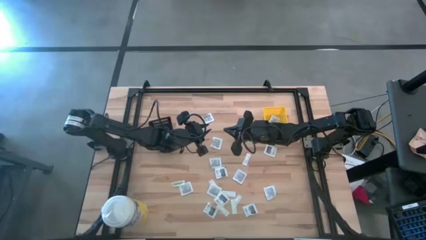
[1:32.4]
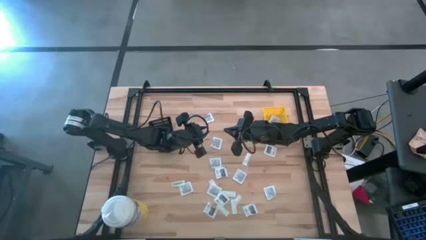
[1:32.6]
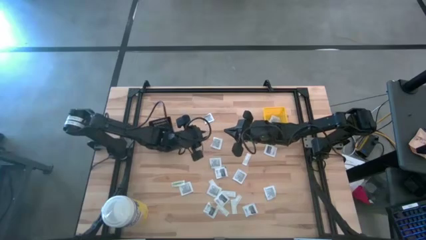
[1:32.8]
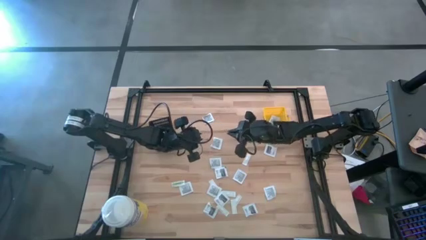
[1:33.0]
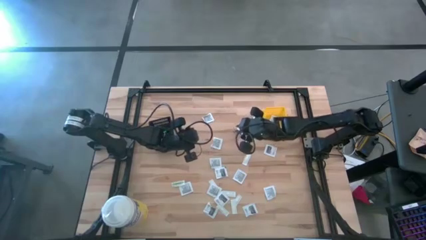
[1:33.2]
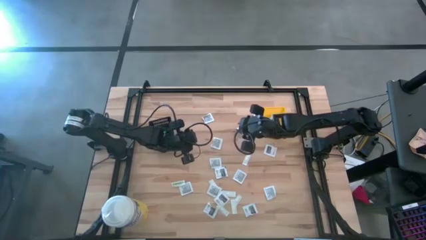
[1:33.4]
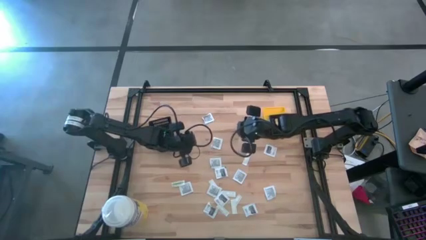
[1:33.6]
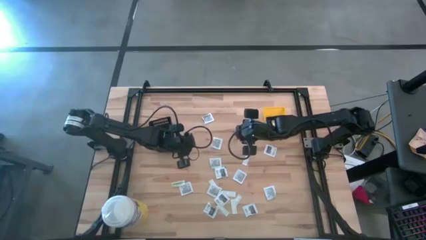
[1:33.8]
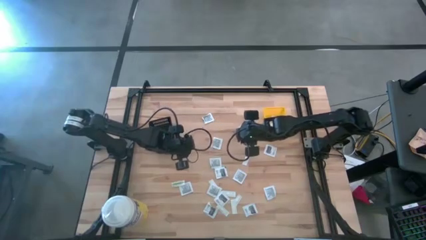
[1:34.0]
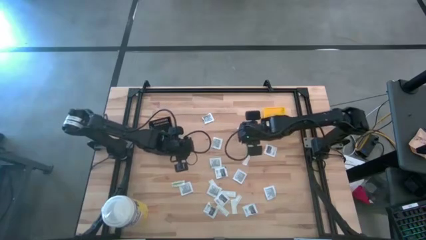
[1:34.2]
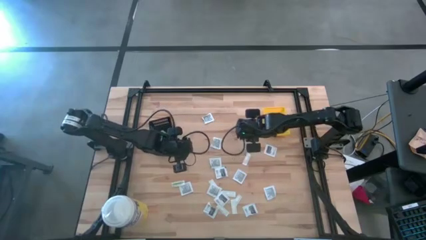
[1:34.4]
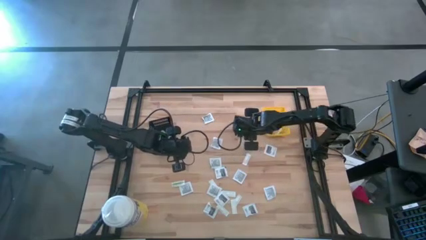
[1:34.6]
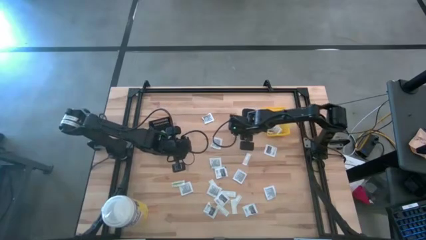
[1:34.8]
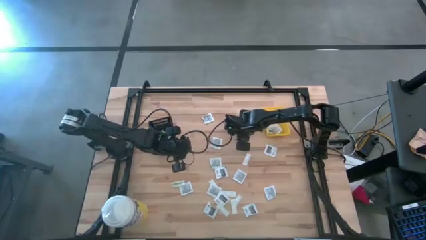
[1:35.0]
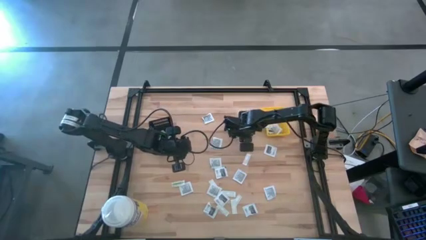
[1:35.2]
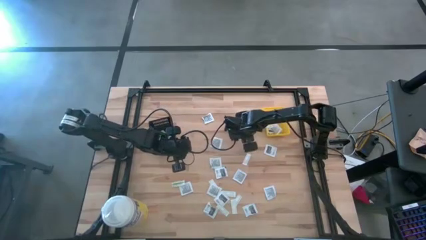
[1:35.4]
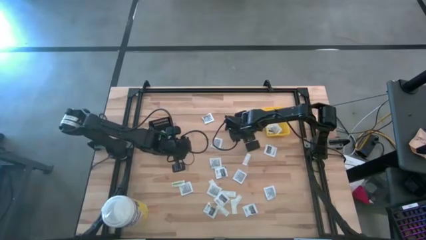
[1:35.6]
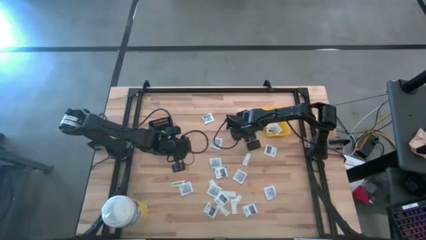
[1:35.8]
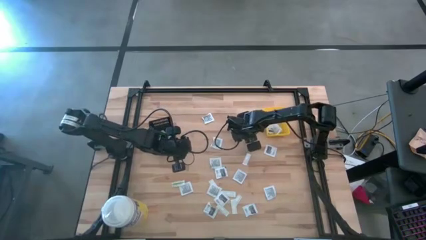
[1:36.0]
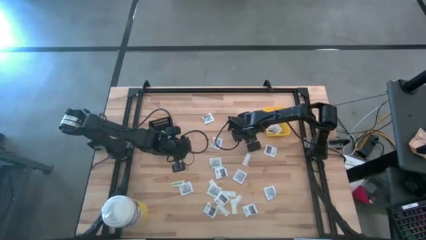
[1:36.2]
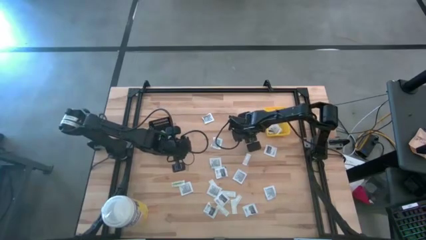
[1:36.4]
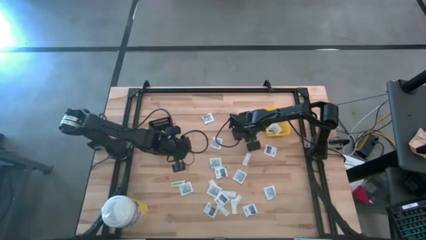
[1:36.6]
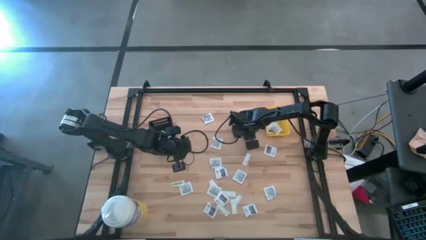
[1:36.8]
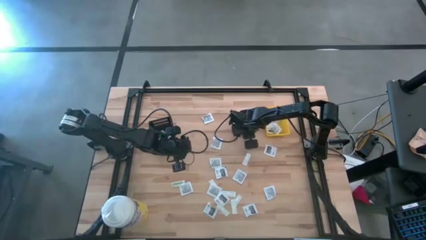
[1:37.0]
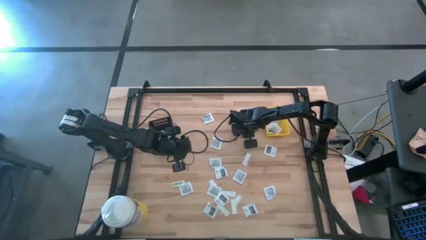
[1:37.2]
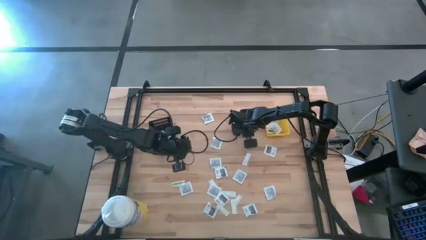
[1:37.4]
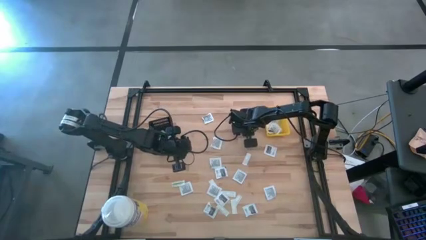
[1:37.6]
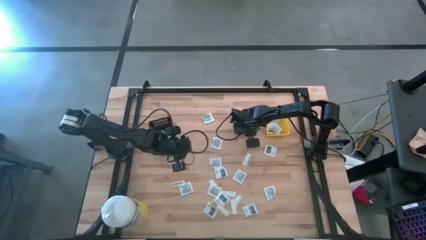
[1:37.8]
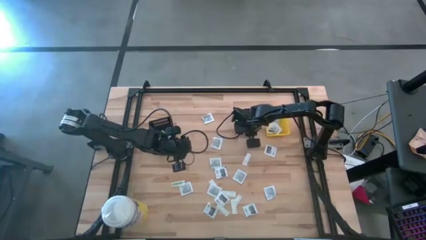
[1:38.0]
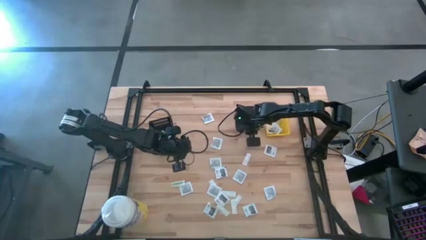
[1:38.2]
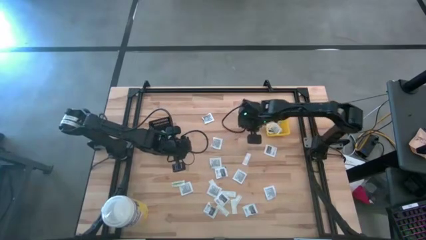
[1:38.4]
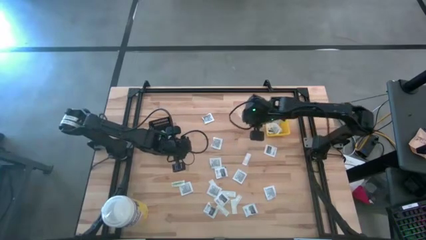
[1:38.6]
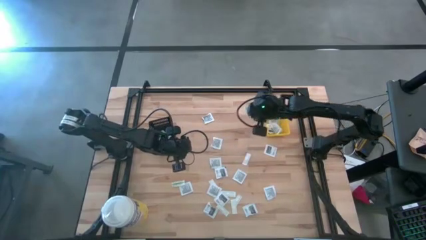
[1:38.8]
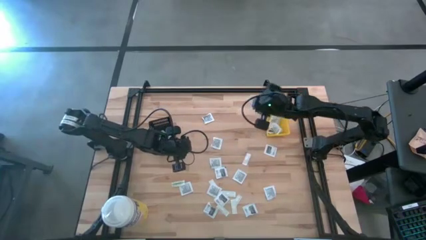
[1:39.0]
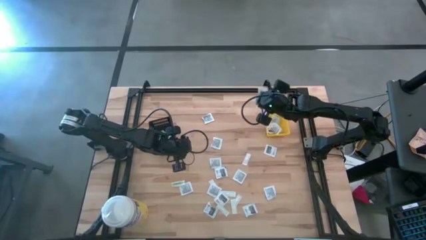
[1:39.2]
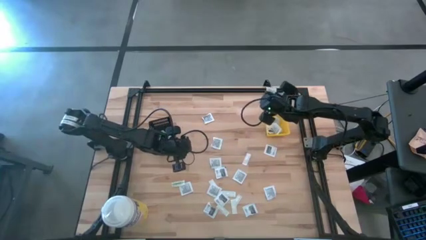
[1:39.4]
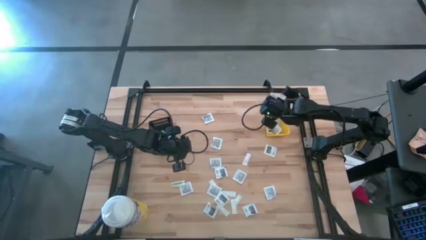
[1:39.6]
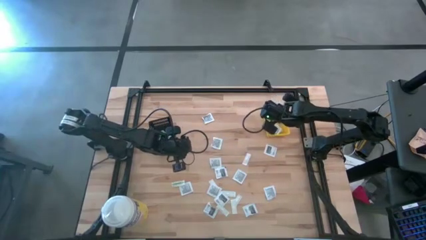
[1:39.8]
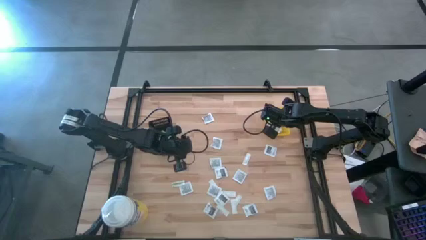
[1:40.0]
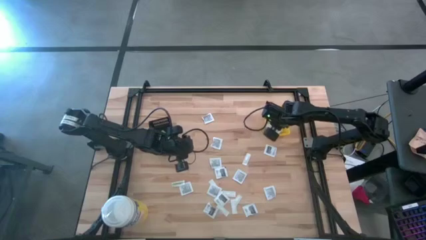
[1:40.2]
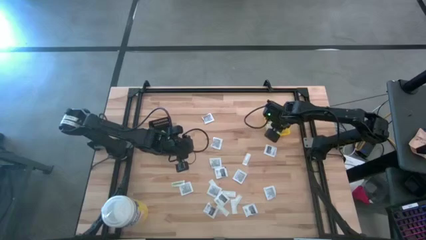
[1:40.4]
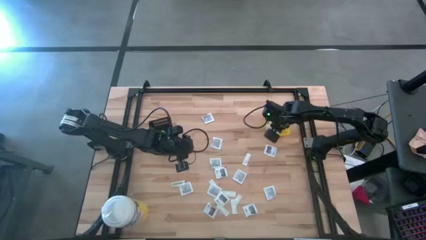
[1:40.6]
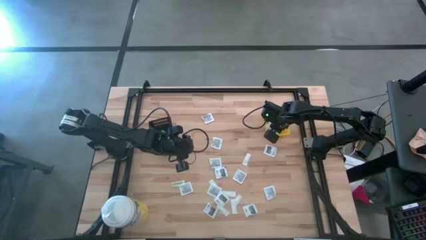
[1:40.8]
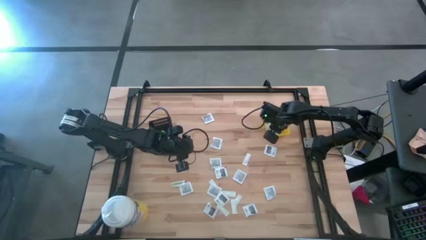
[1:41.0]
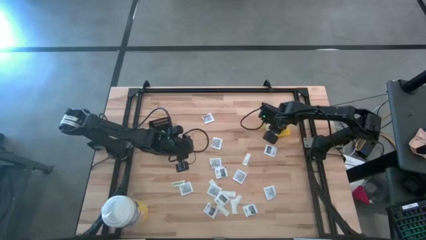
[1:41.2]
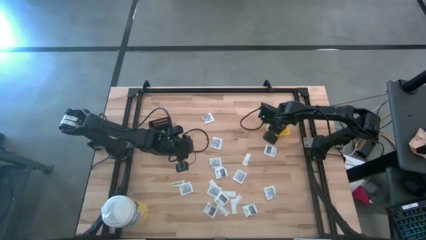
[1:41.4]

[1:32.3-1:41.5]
Task: Pick & Place First Aid Supplies
Put the black pad into the yellow bin

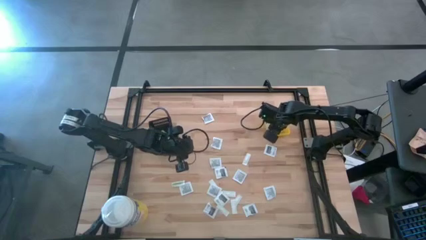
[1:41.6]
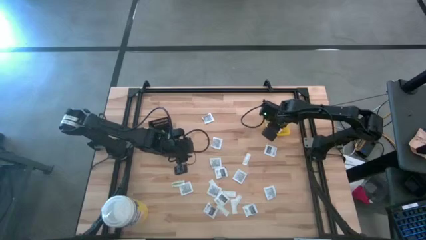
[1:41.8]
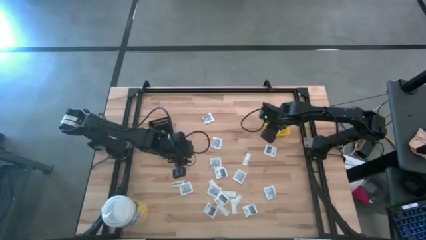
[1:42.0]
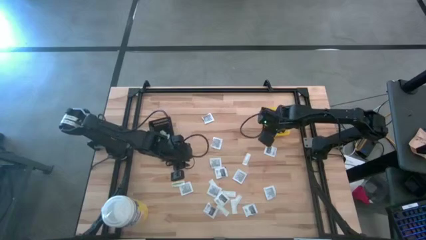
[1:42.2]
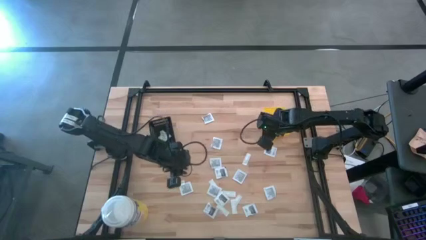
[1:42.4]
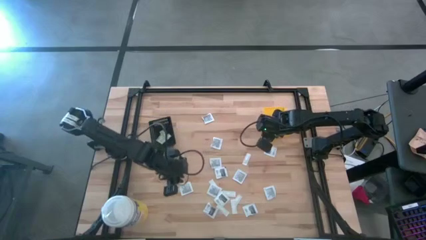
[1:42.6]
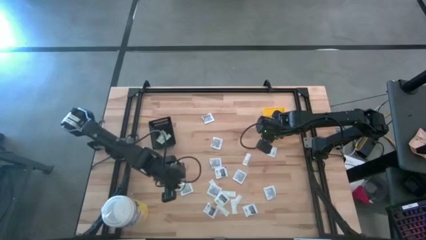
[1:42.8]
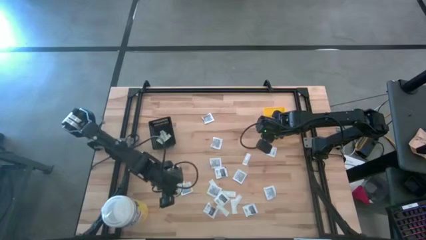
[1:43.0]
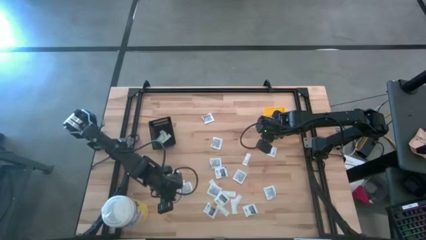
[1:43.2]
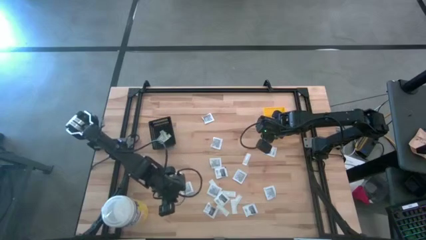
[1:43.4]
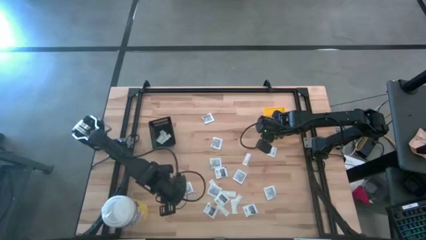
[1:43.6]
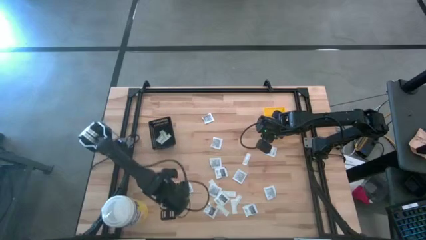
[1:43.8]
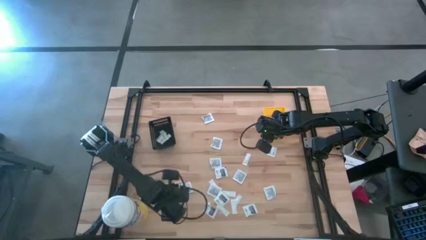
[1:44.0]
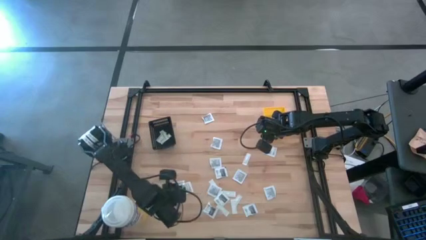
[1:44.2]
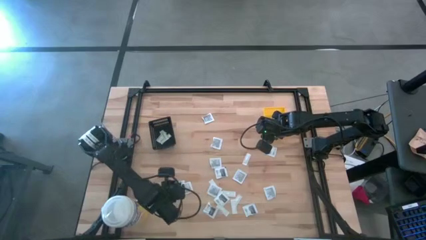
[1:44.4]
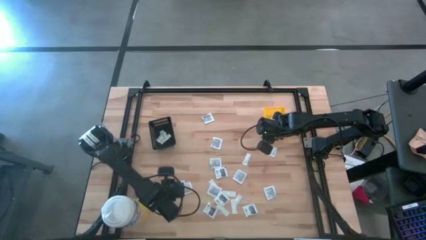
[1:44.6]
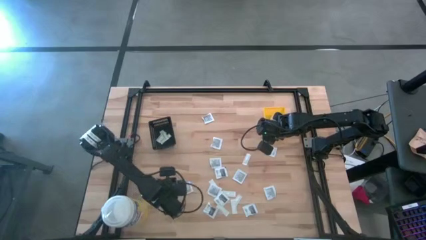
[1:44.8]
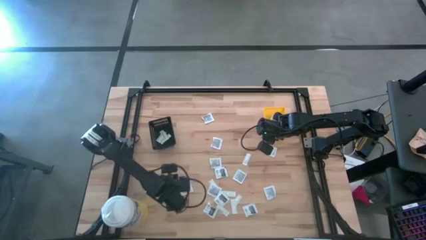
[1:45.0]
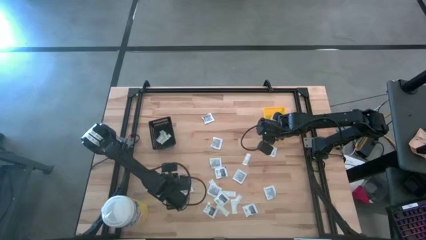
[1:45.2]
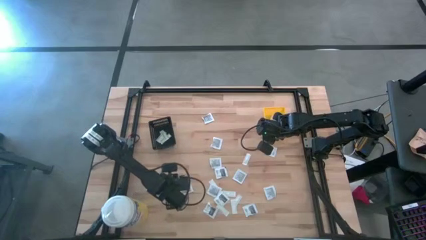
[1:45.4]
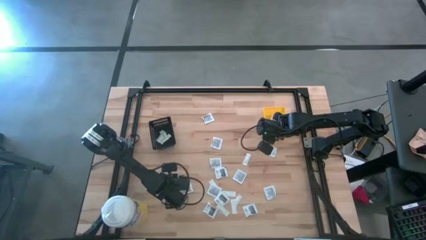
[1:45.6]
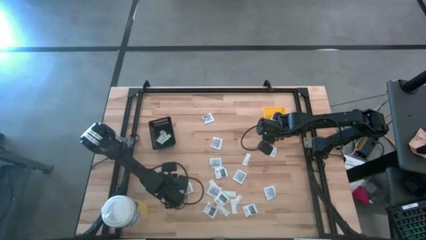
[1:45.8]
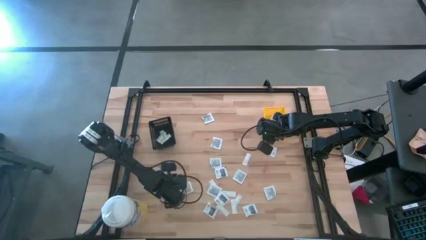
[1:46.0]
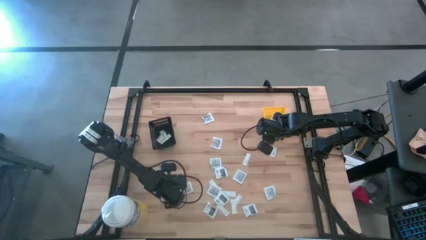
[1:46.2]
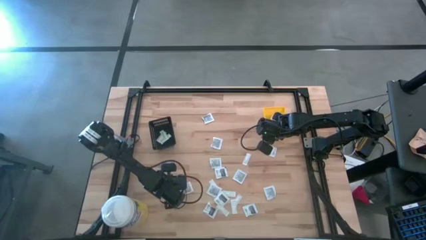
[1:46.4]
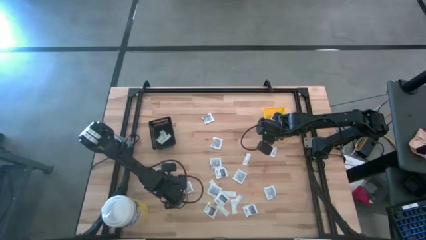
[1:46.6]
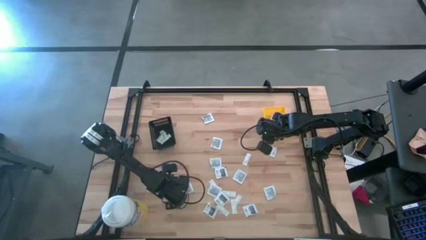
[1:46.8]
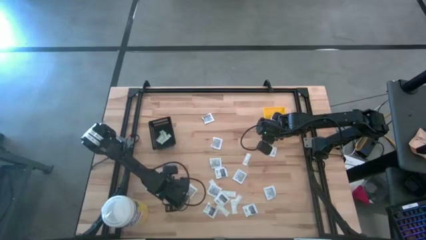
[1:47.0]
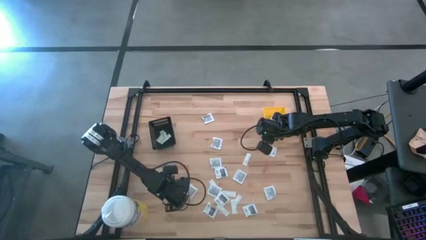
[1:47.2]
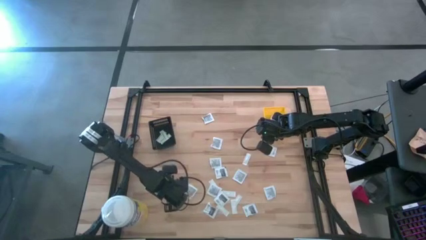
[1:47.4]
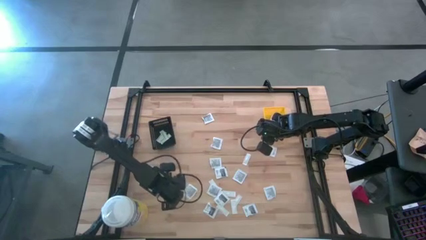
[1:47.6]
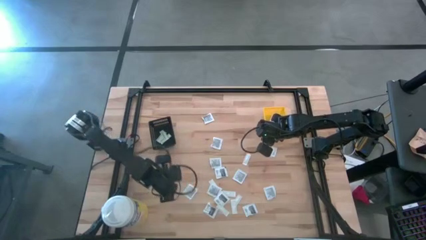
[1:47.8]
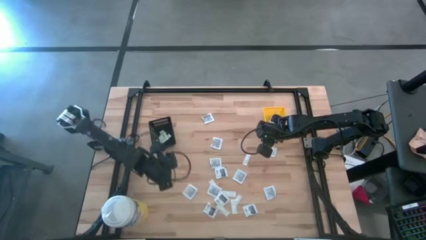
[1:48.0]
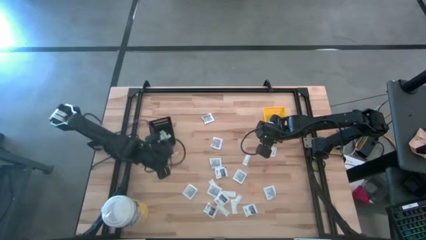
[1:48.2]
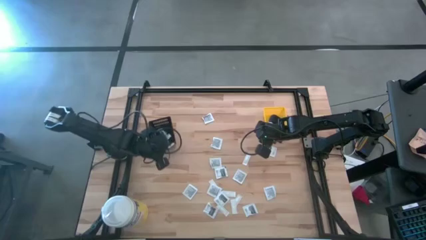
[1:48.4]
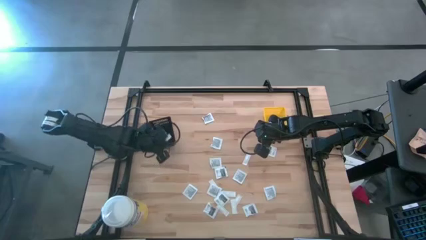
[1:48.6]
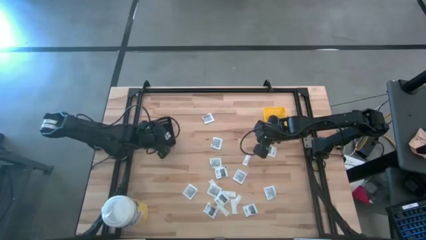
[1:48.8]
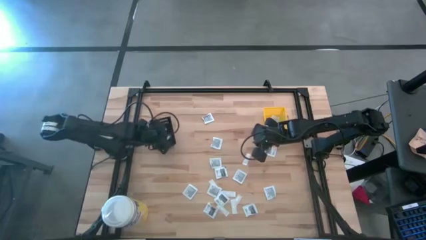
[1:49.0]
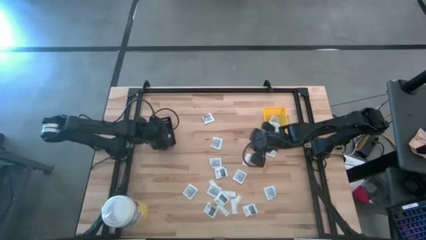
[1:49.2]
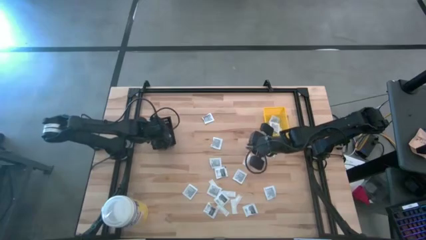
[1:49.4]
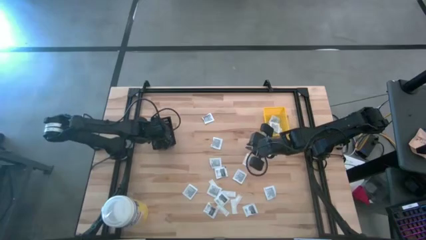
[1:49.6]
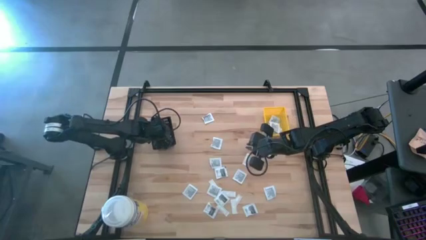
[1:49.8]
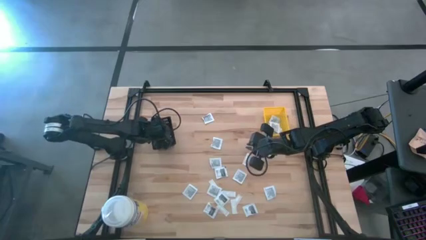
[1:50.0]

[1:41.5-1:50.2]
Put the green bandage into the black bin
